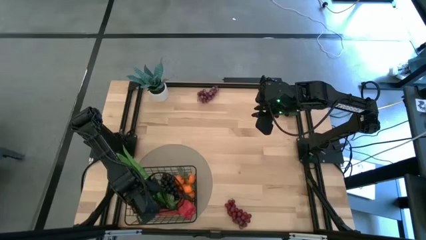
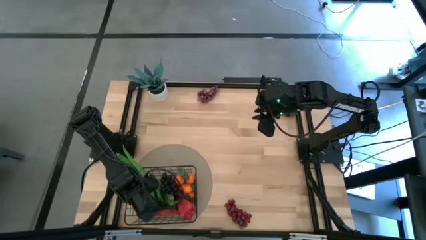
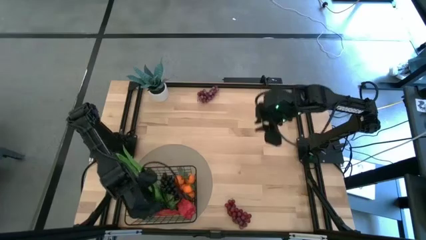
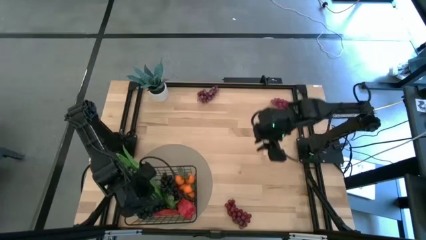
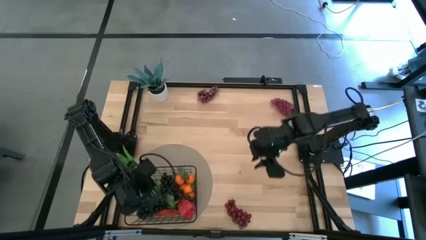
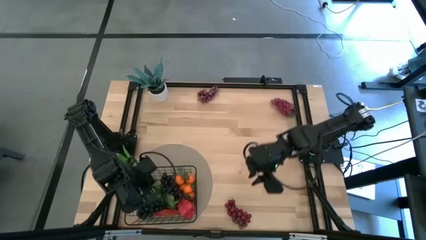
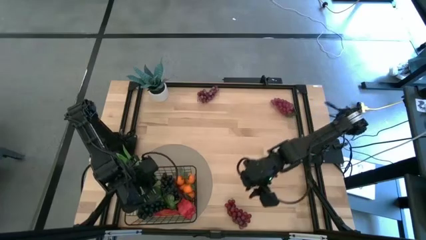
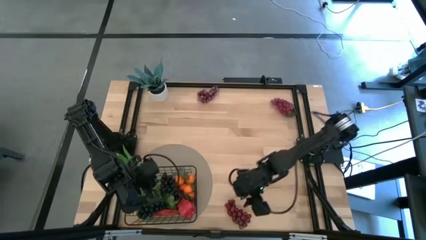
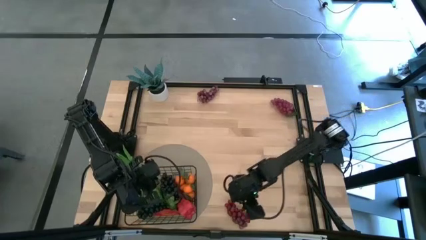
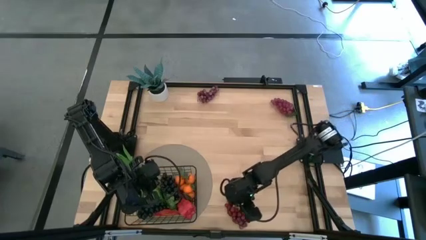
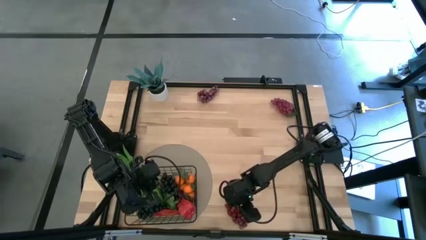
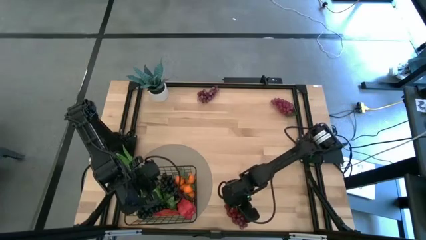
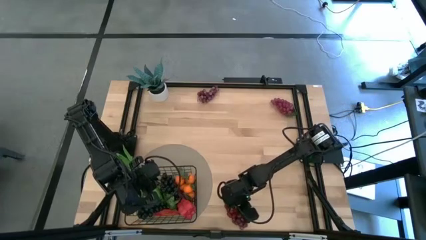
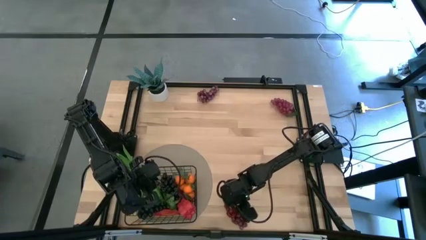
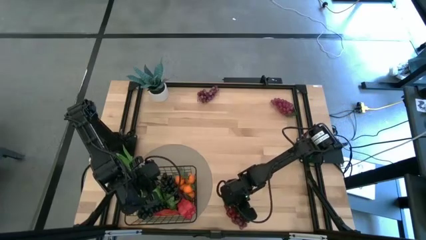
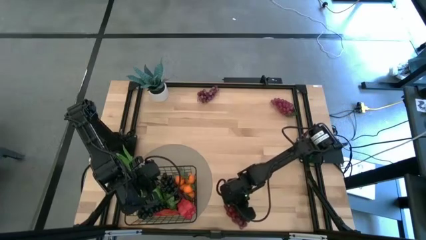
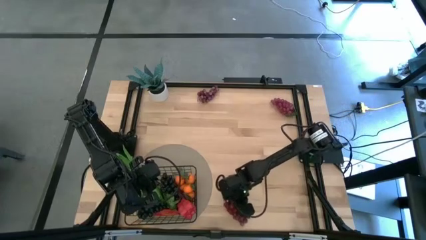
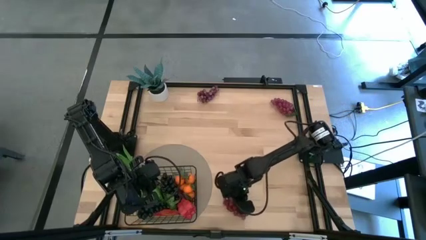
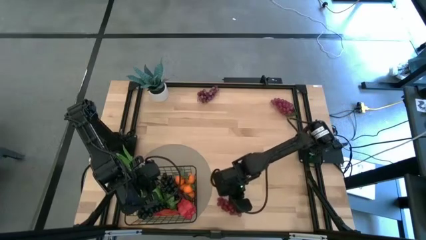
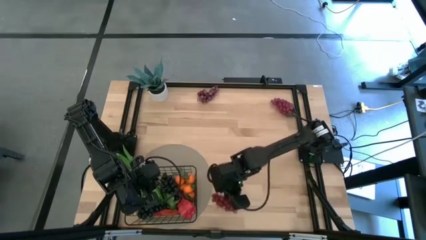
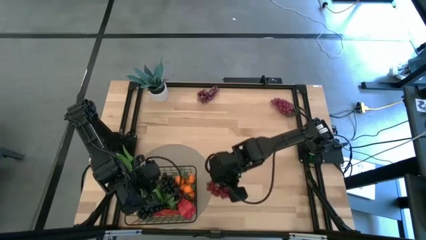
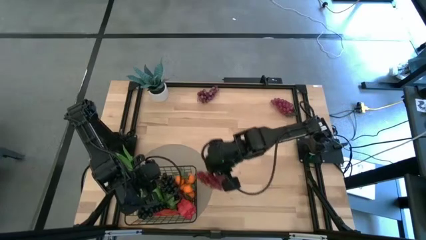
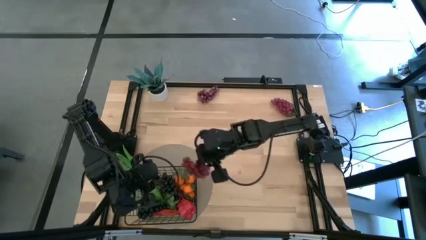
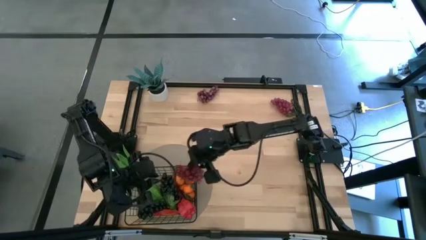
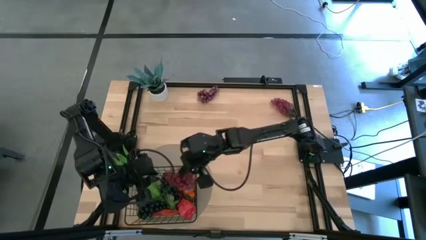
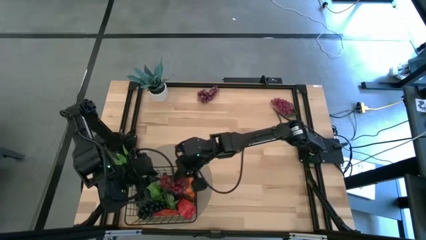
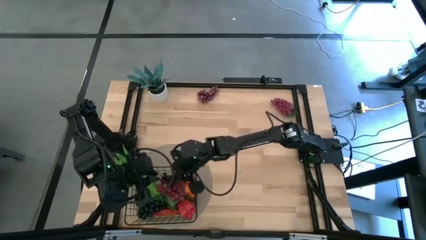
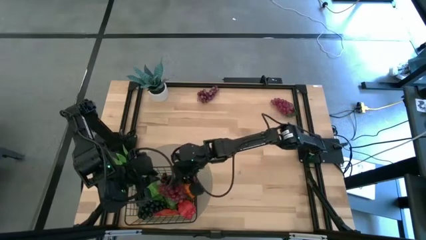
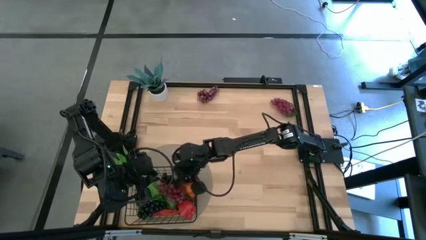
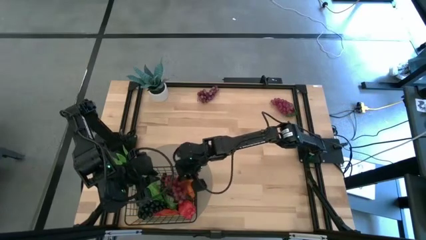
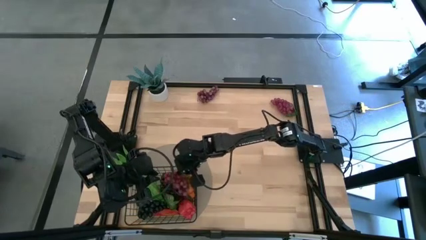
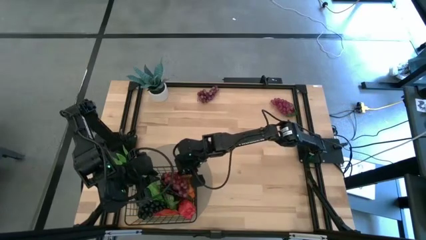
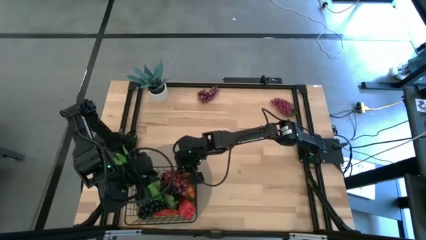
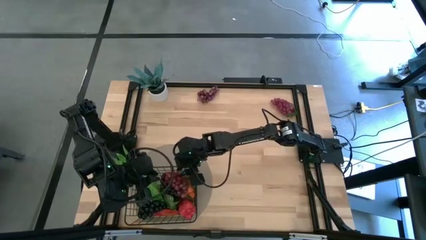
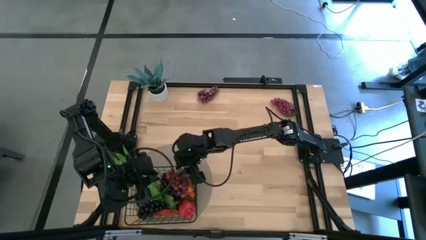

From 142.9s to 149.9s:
Task: Build produce basket
Put the bottom red grapes into the wire basket

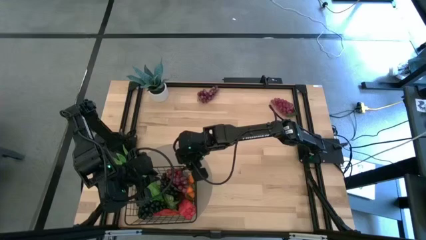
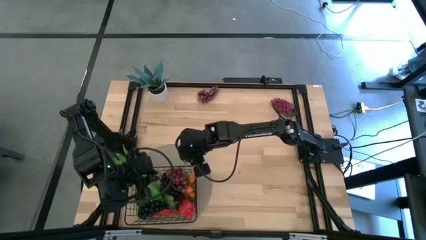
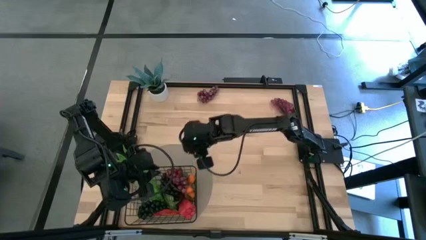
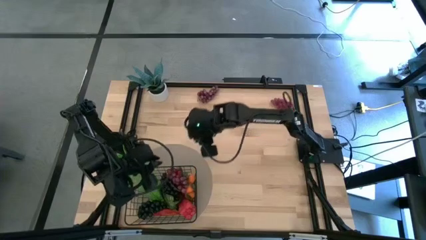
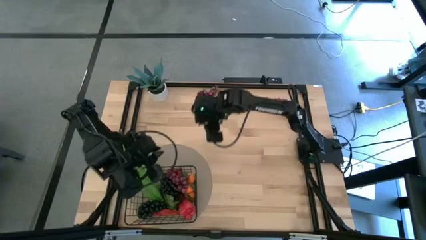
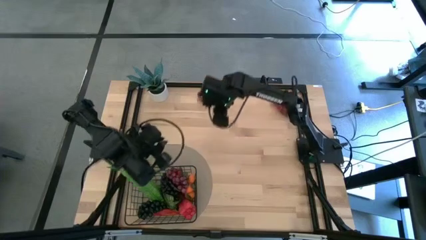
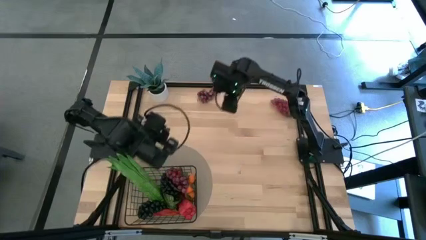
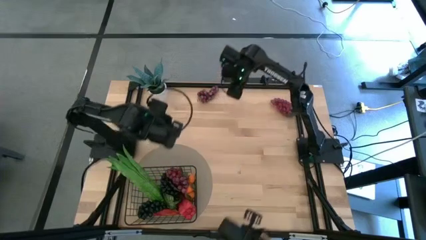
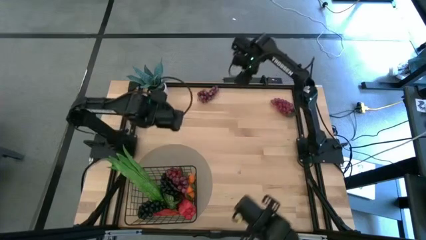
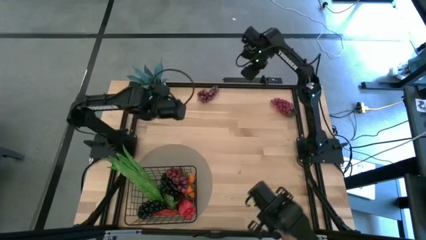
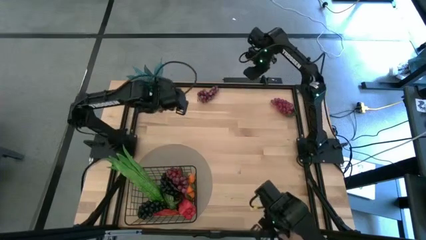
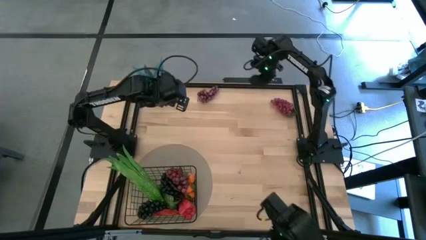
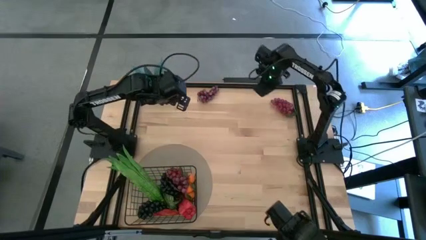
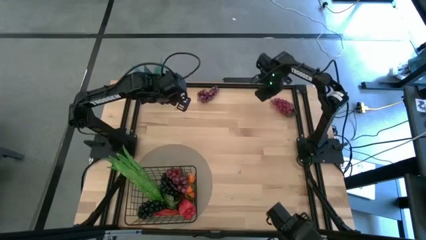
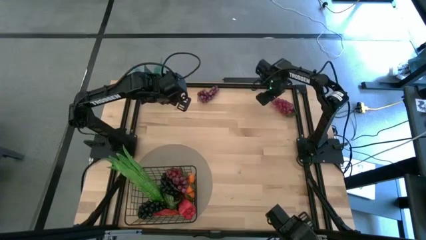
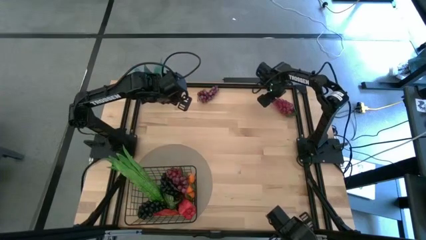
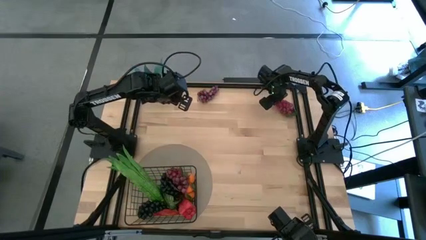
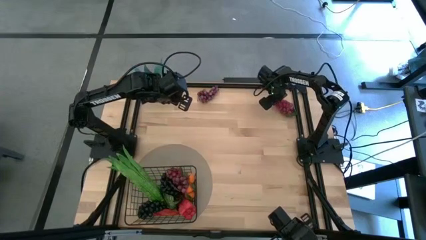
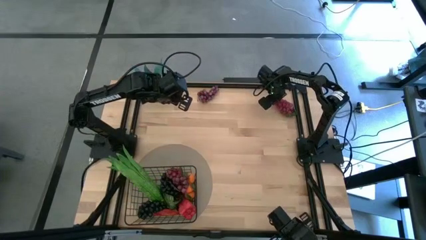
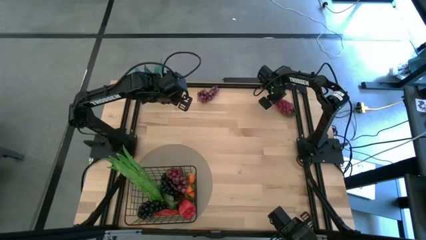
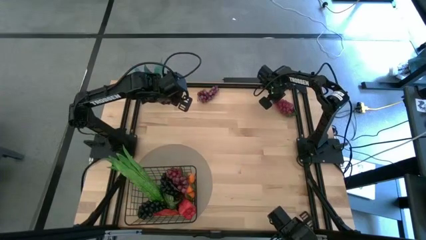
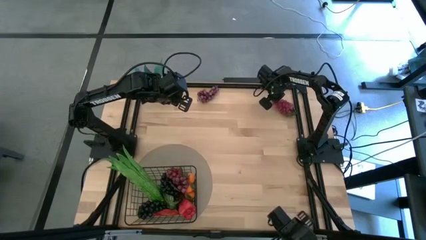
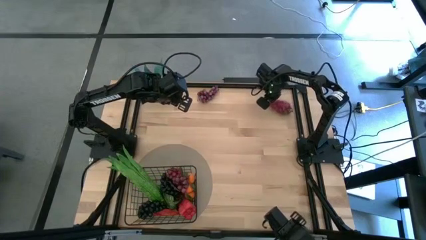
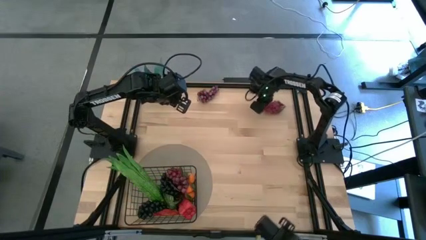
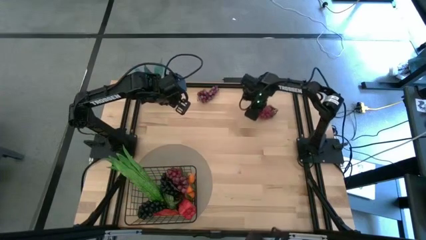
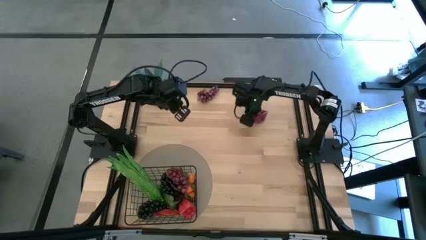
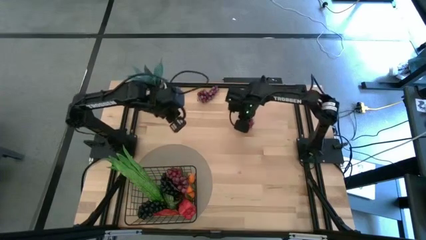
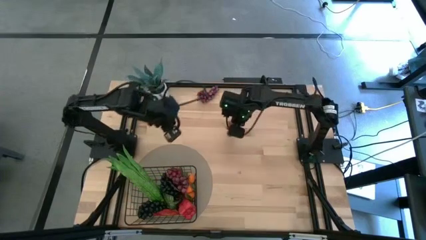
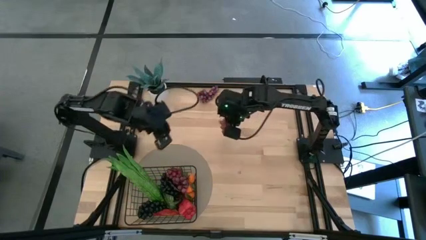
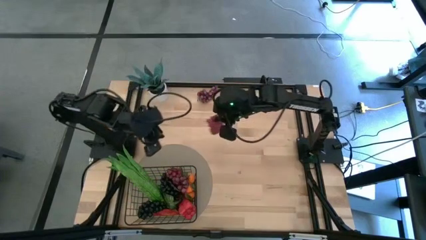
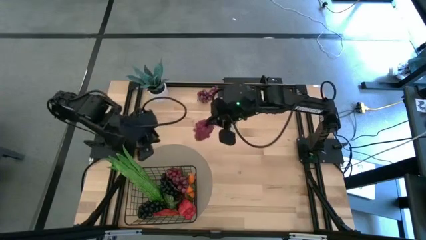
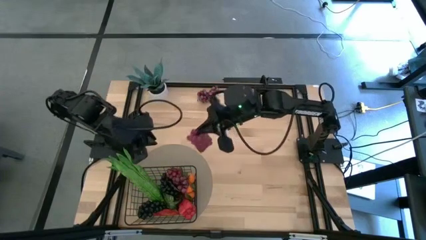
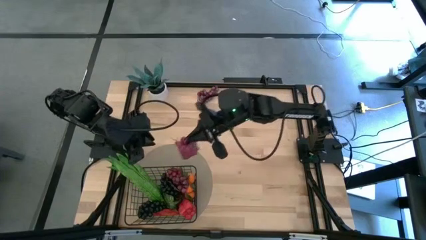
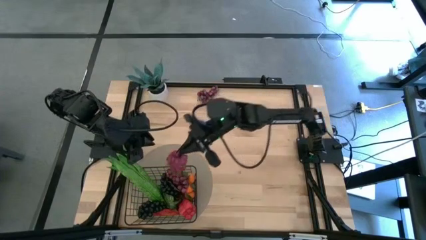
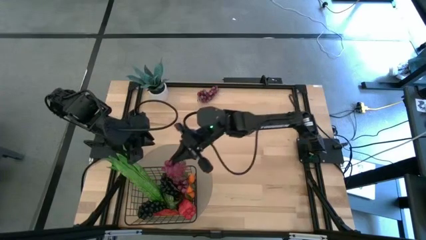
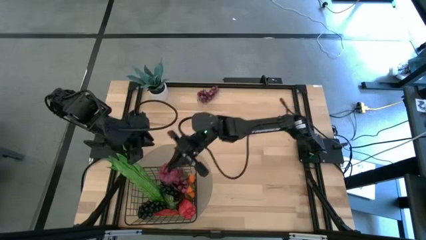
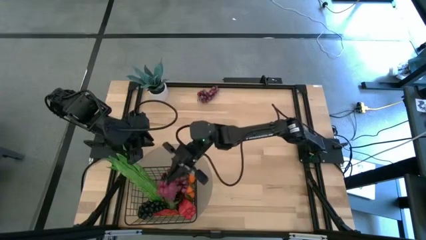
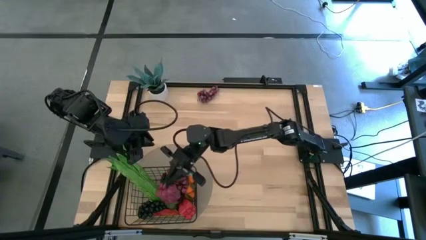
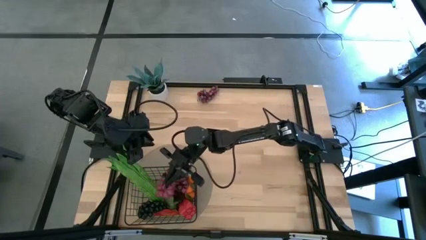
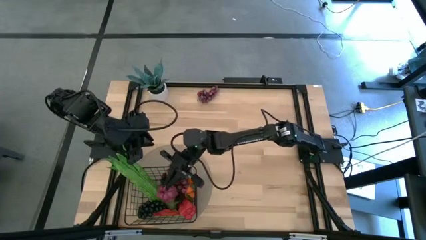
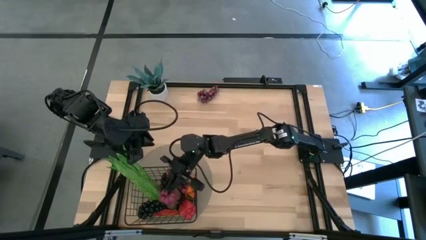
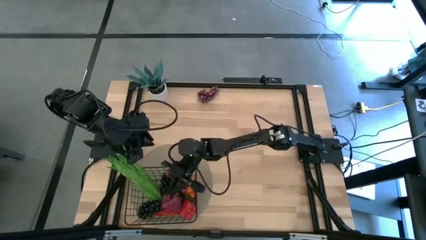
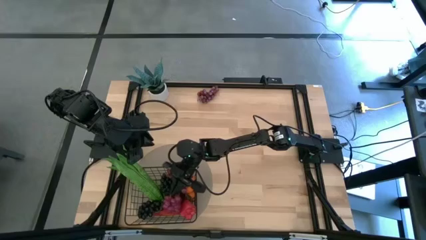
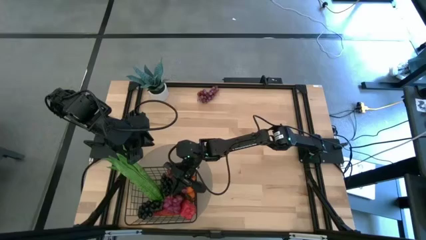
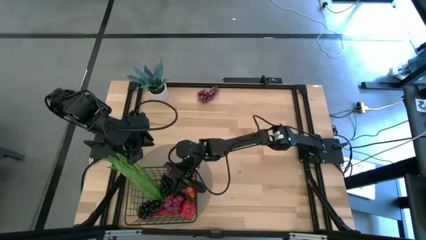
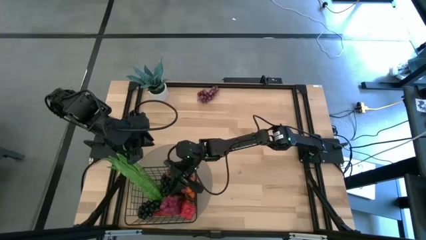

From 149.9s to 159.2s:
Put the right red grapes into the wire basket
